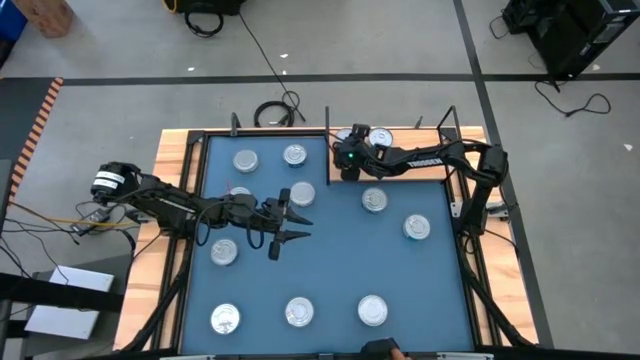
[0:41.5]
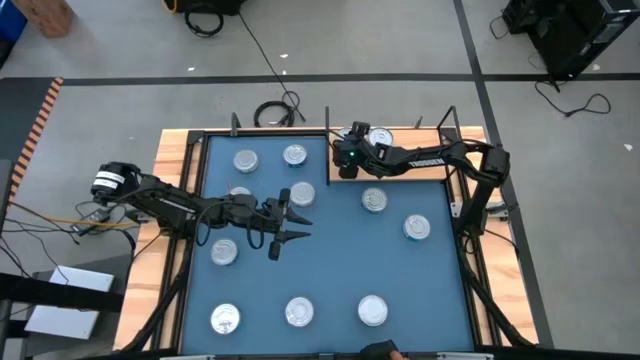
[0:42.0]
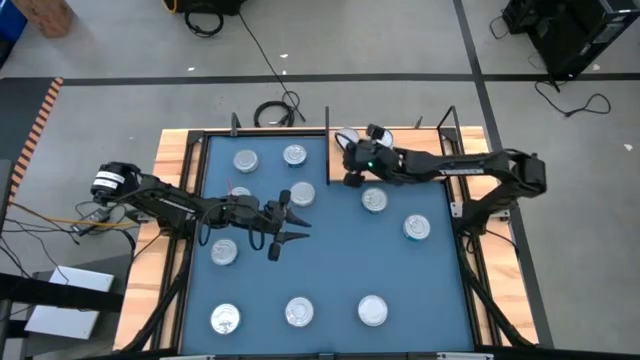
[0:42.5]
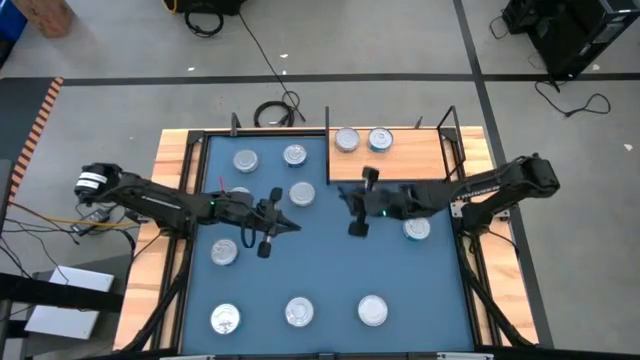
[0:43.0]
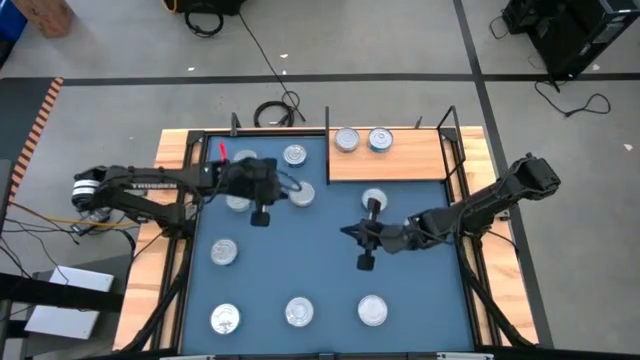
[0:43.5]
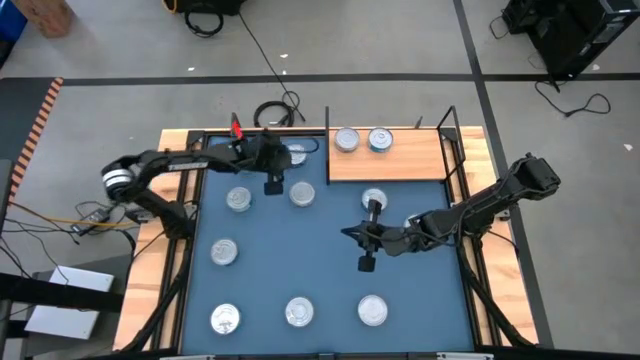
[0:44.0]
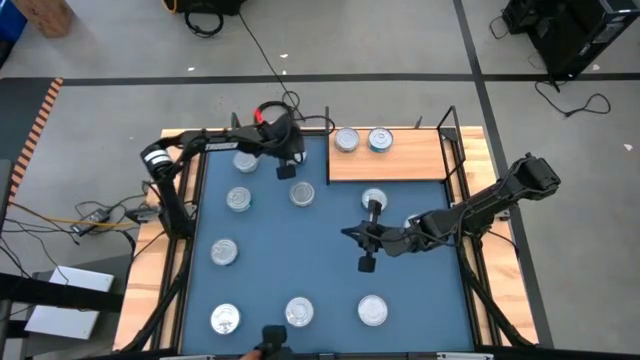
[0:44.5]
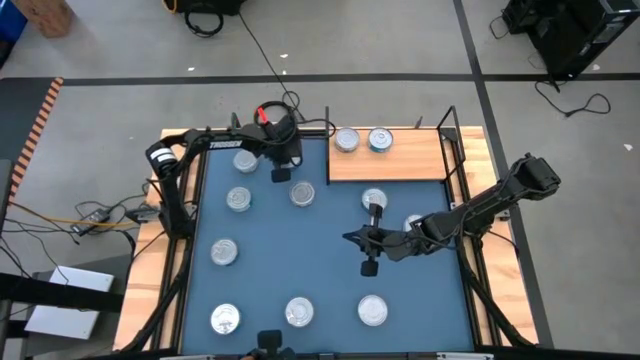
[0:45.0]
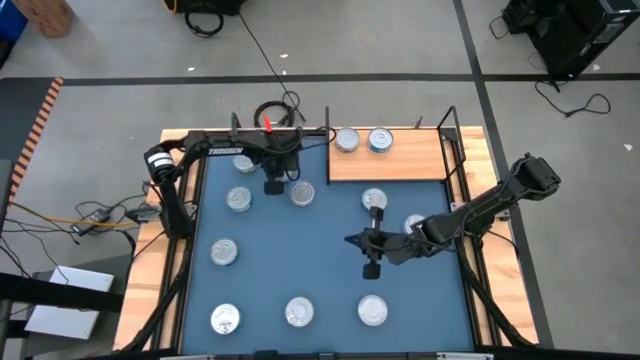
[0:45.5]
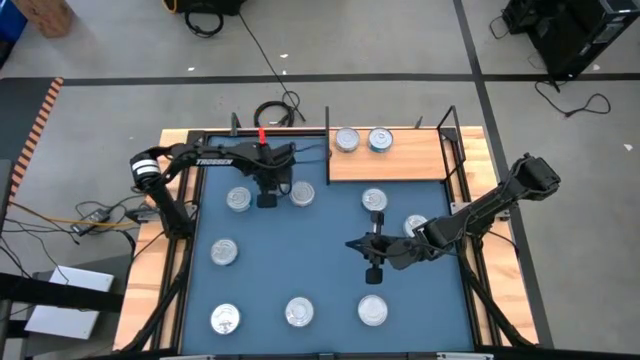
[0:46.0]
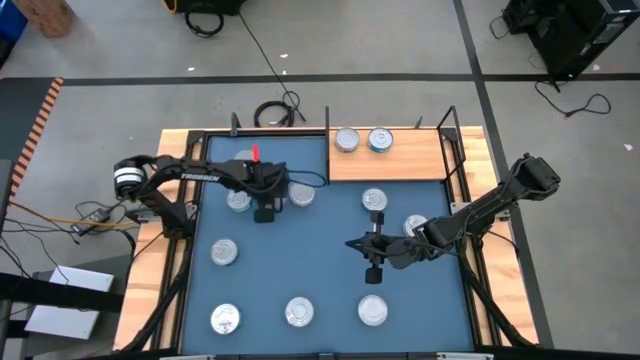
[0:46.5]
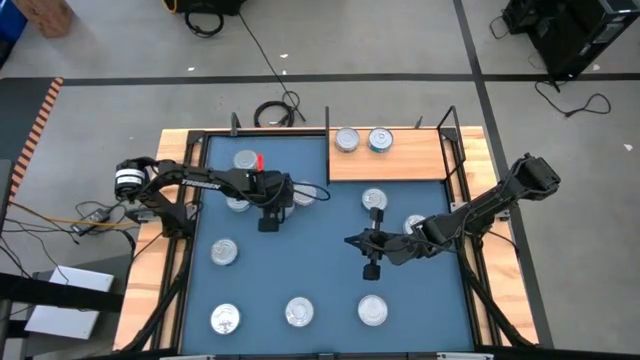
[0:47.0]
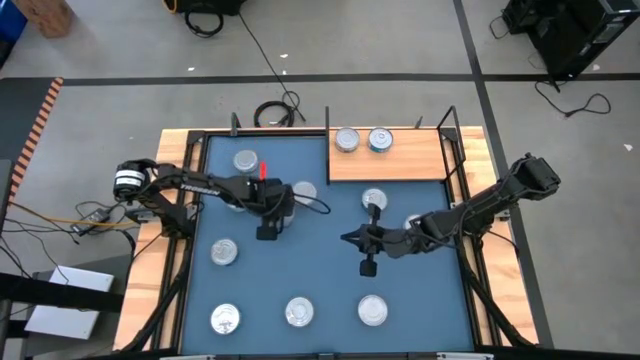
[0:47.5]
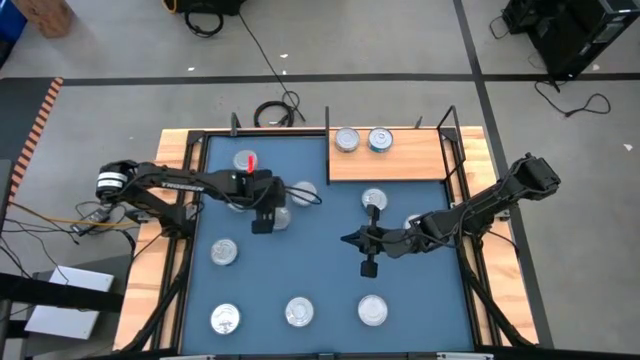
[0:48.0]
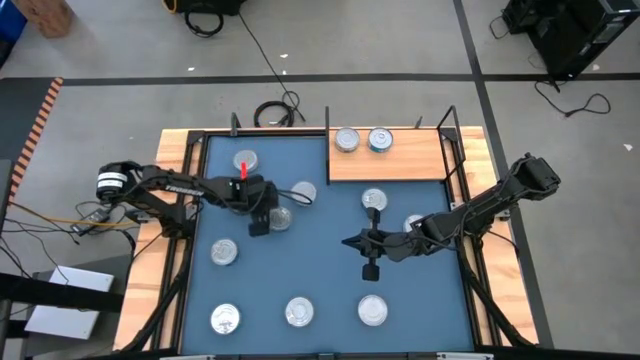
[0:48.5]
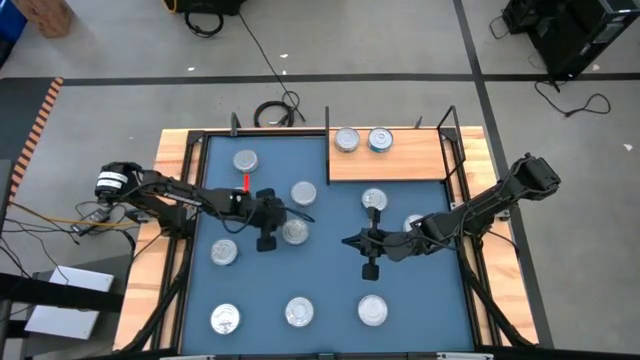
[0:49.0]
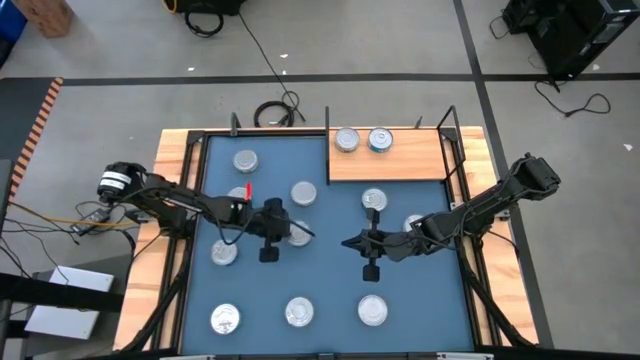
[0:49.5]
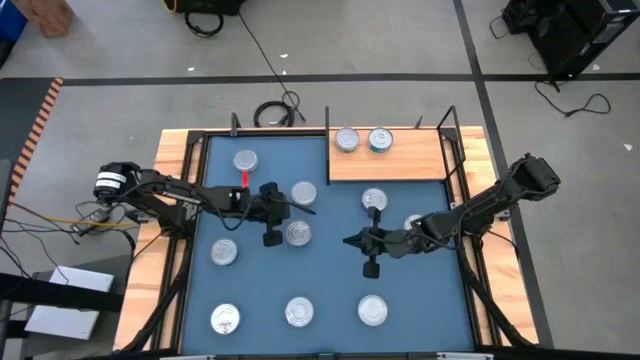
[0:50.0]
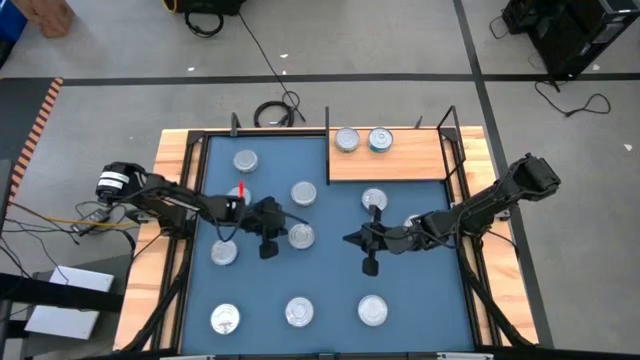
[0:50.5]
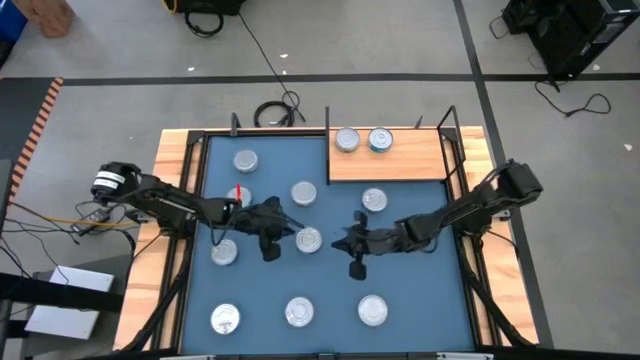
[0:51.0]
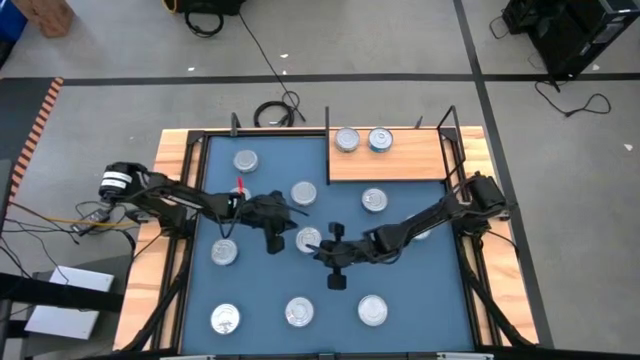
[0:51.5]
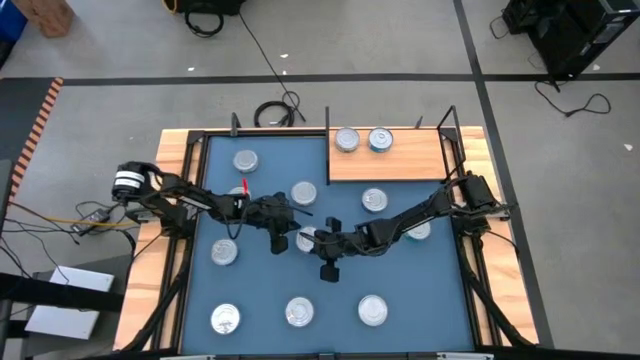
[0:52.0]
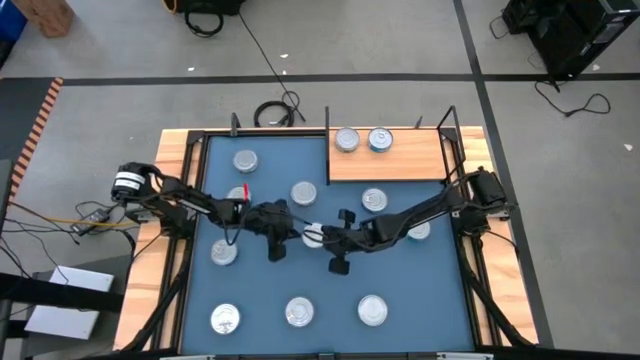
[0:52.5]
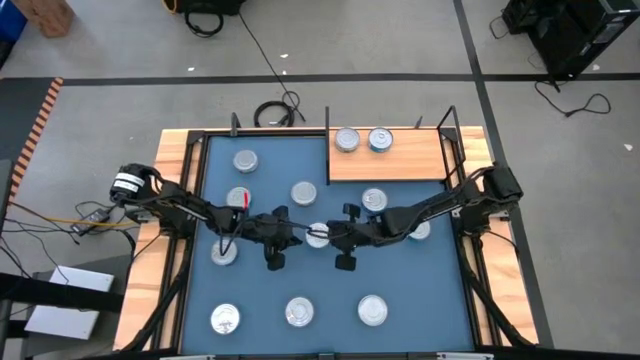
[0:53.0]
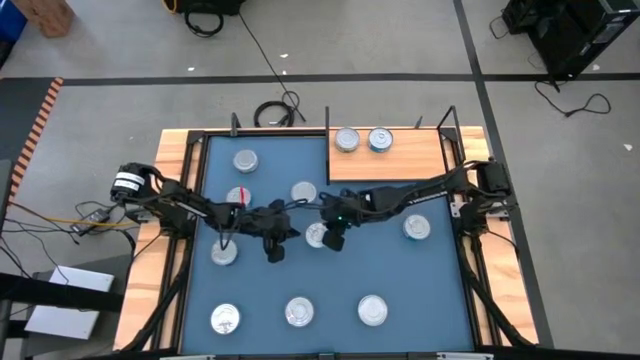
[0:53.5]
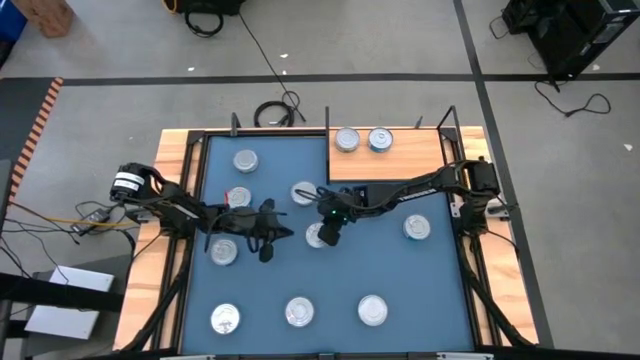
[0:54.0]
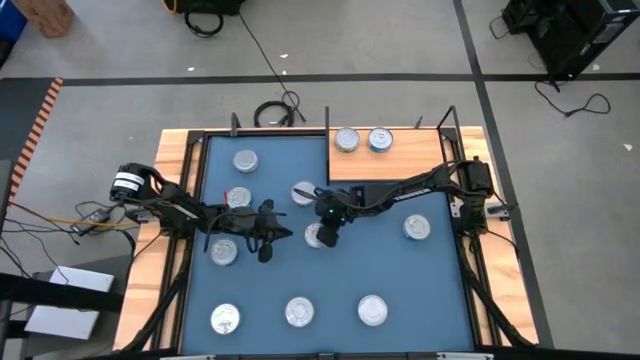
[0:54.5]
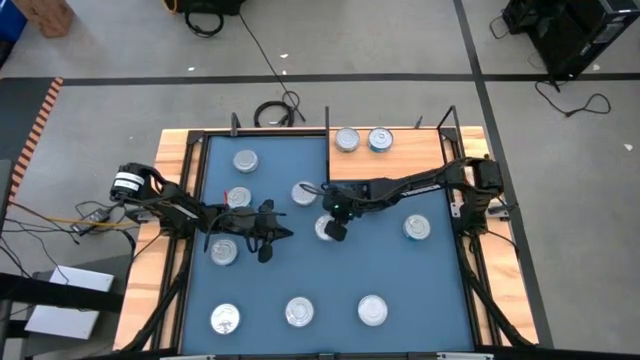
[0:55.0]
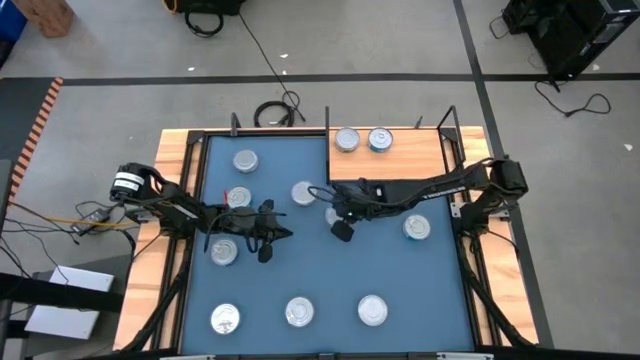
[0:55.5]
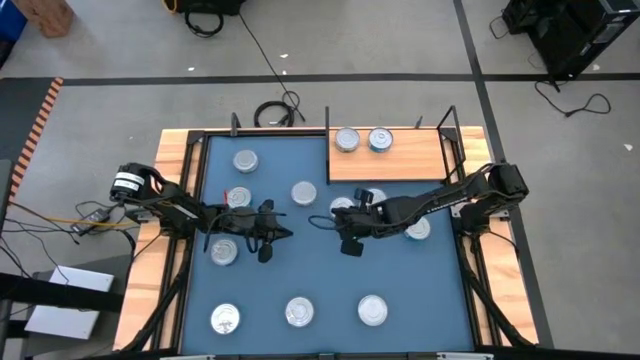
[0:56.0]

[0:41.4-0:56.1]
Task: Stack canned seafood by type on shelf
Put the top center blue tuna can on the shelf

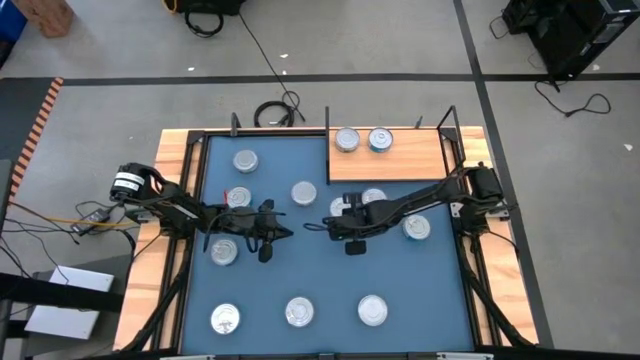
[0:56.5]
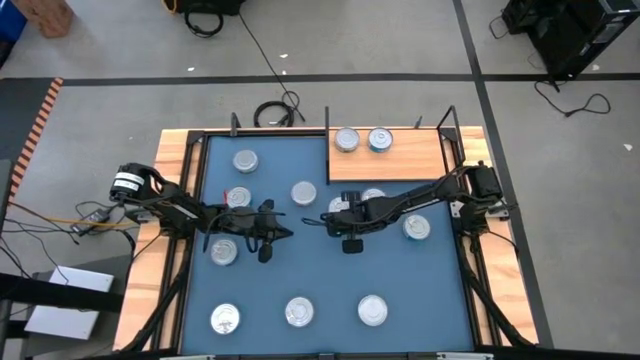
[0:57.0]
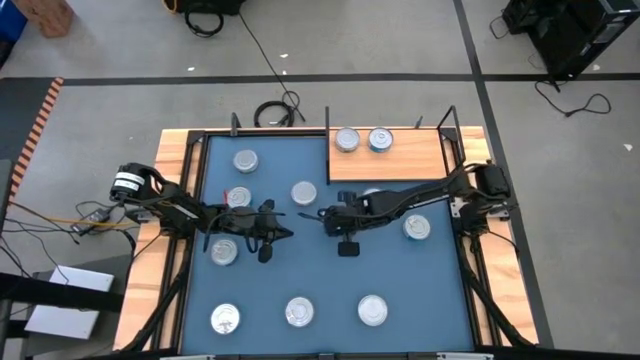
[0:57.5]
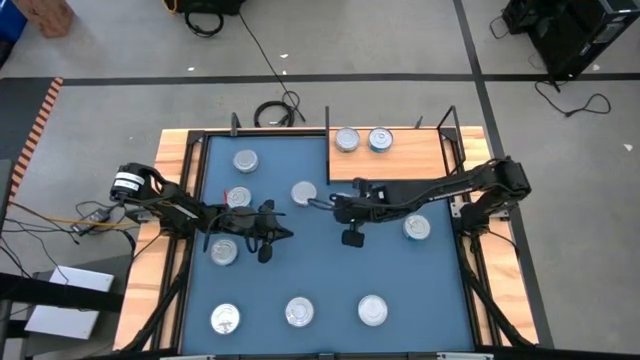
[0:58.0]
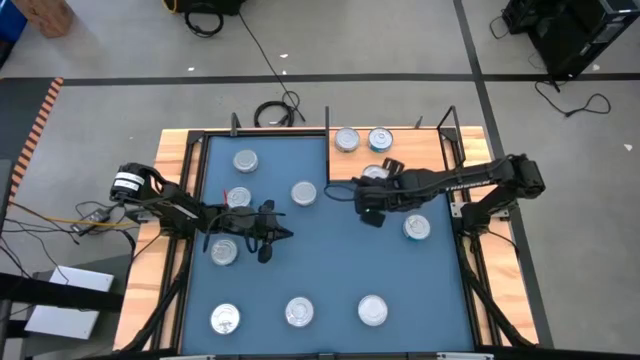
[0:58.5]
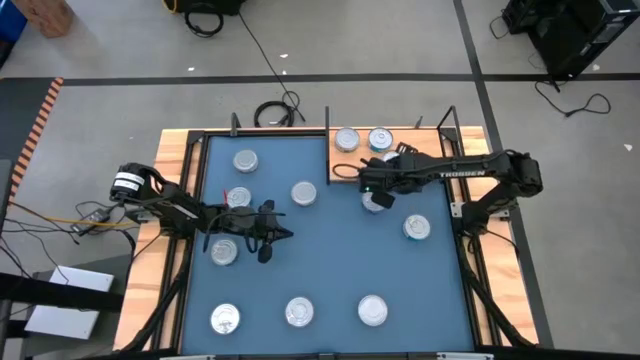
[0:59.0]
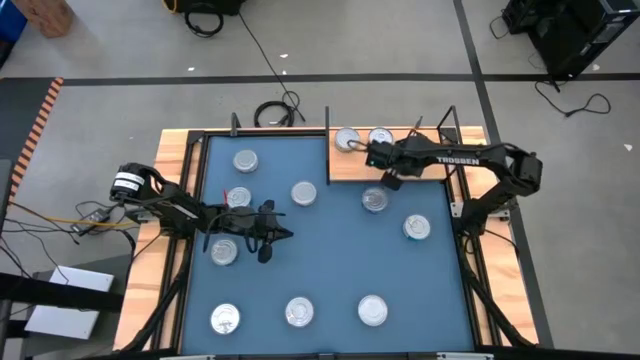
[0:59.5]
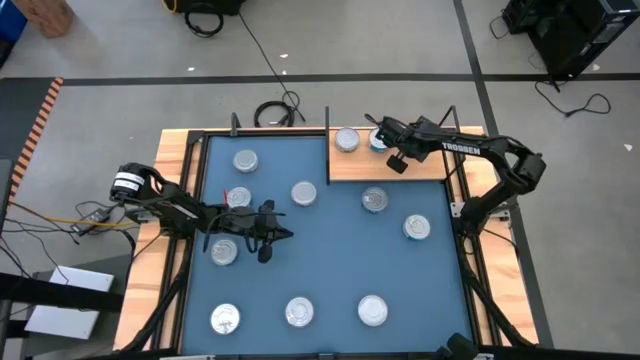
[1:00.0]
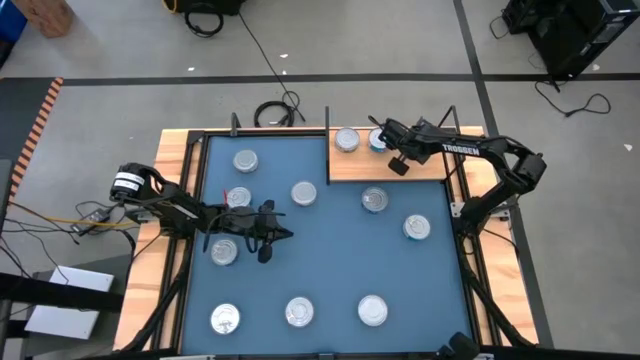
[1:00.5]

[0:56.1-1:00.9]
Put the top center blue tuna can on the shelf
